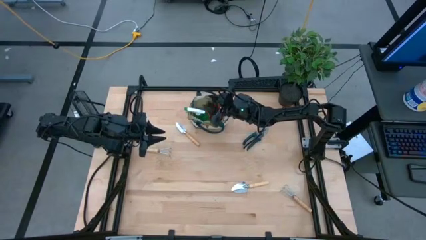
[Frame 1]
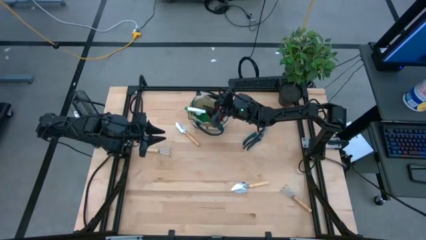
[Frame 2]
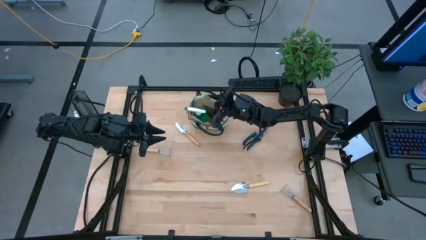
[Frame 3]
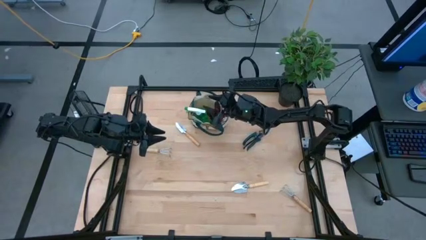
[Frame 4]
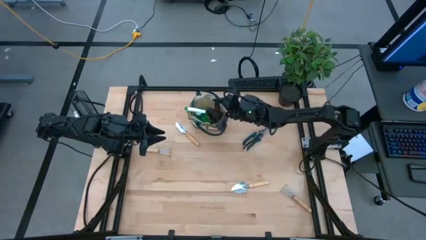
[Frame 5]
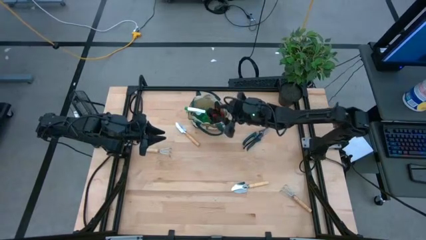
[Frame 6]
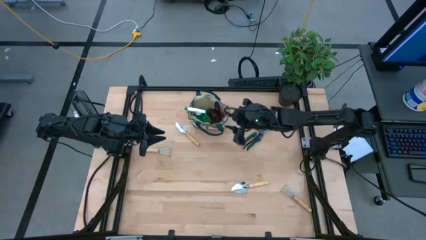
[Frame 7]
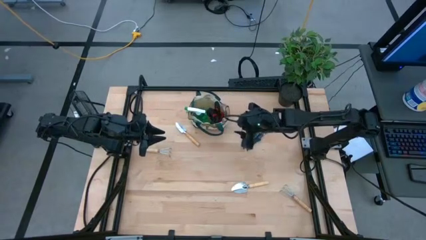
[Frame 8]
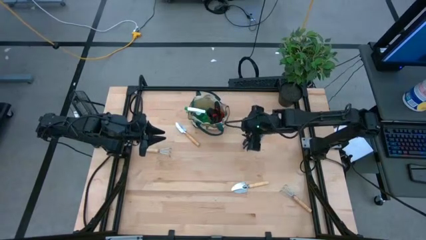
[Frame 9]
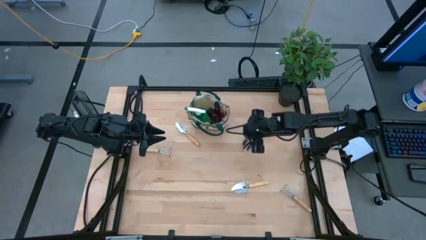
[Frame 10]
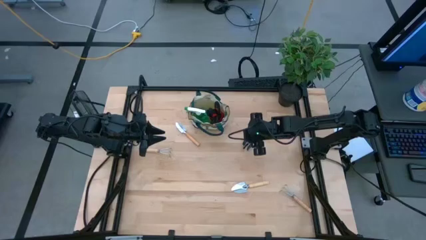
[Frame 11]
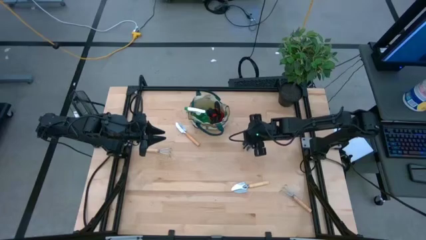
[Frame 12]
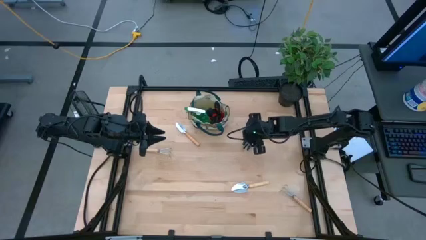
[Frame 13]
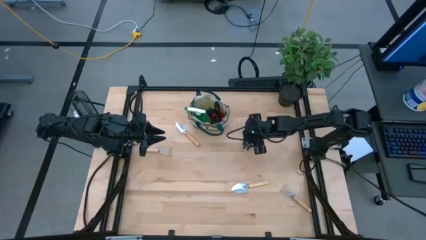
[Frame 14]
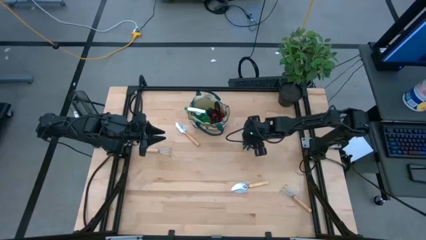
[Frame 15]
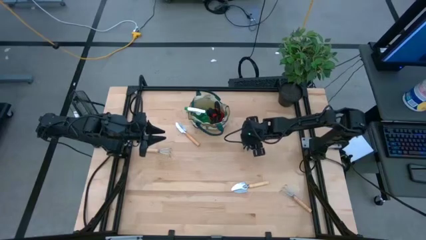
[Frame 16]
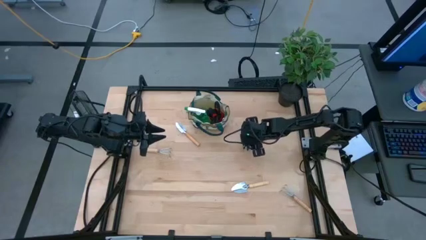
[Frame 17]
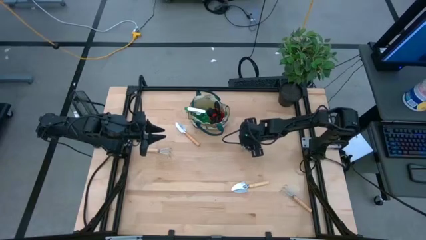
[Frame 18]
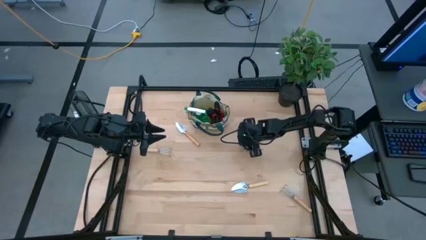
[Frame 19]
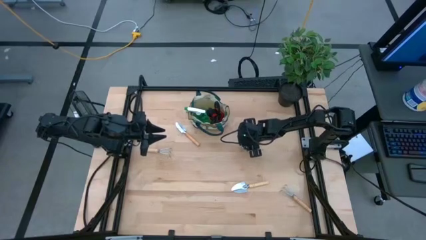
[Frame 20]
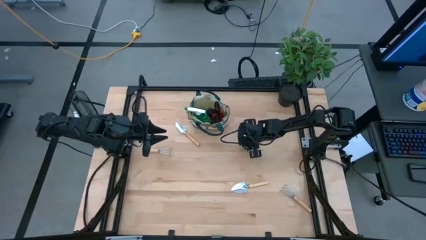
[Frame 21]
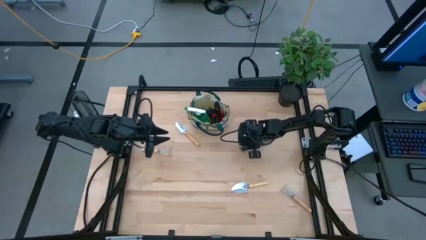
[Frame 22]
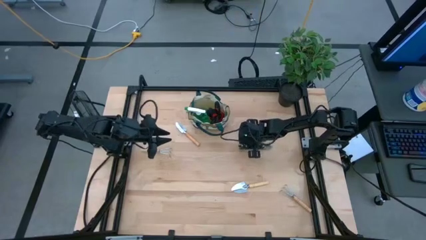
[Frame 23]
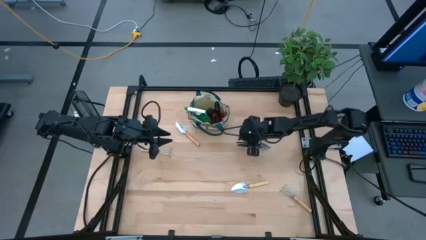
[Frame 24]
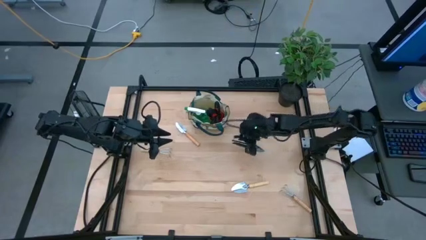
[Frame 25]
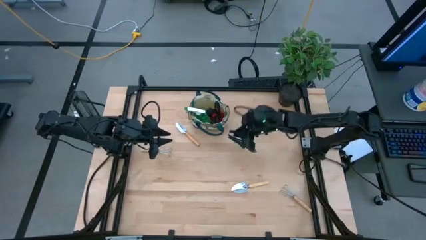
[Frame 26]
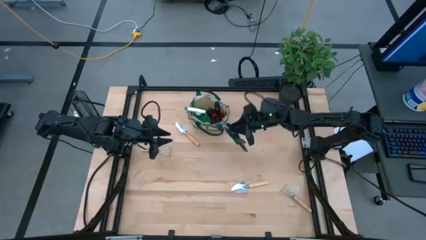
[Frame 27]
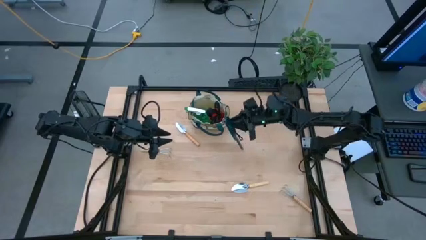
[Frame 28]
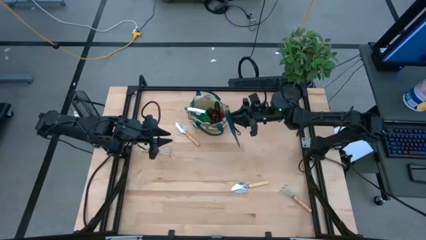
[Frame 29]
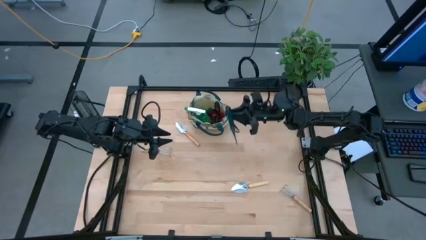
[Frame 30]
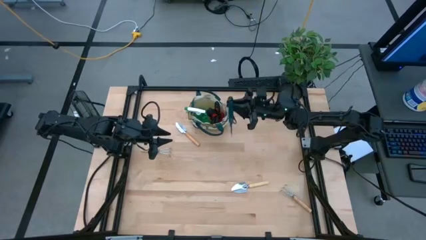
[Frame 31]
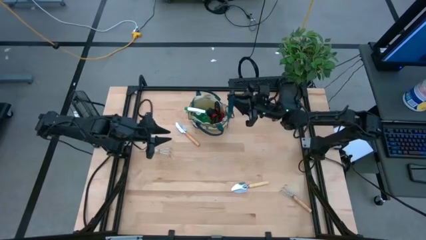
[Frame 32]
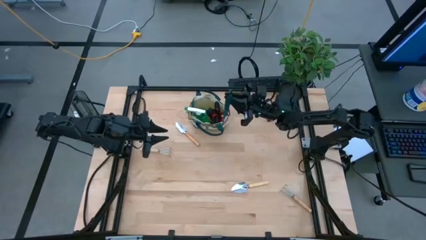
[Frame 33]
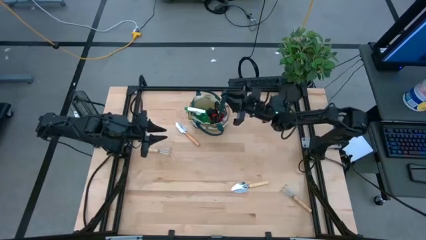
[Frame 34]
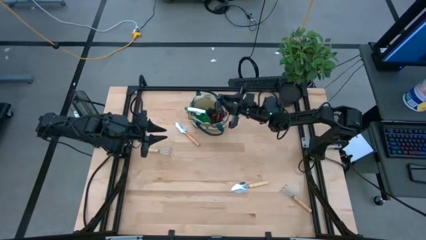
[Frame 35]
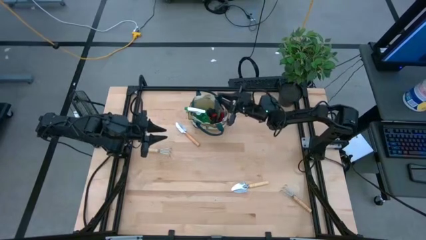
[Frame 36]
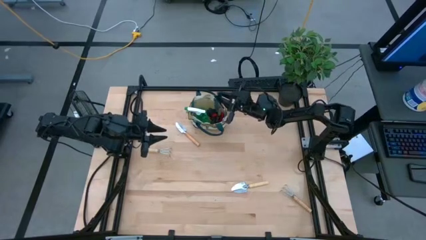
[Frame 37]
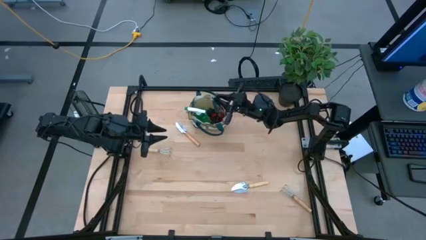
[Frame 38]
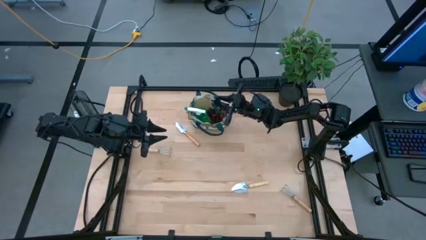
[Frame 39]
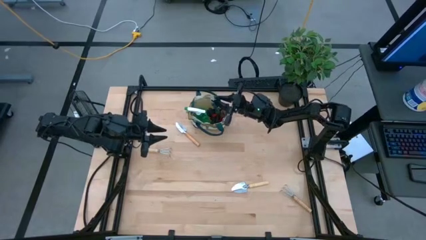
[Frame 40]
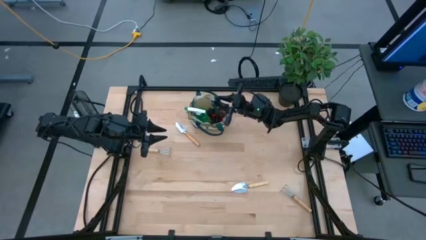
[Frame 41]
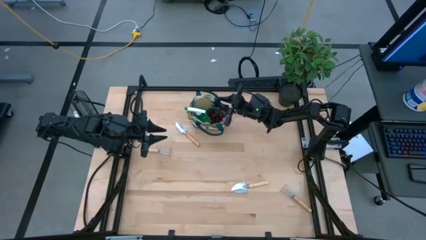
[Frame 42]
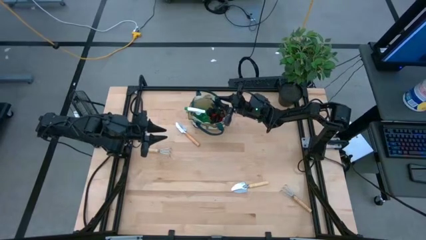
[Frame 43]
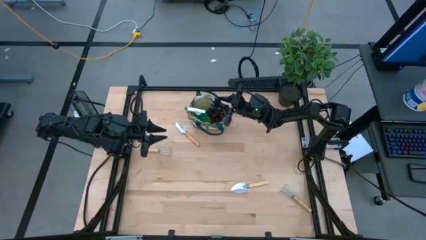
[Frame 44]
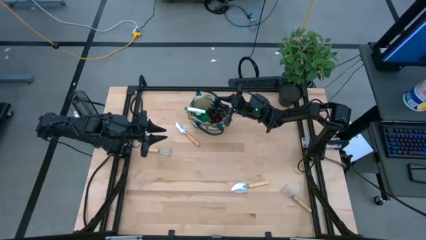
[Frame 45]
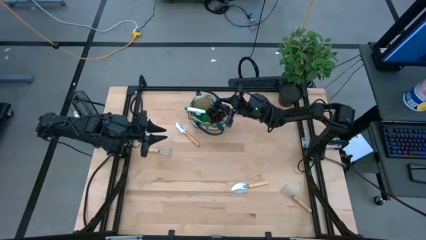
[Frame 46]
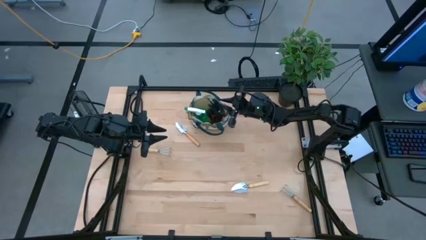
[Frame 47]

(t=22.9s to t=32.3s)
Task: Pick & Place Garden tools in Gardening bag
Put the green shear scissors into the gardening bag

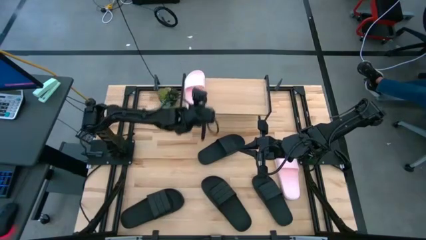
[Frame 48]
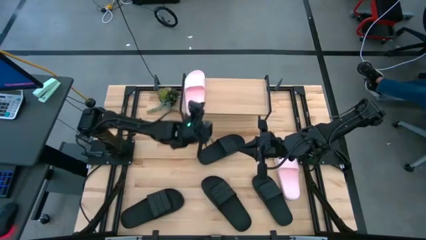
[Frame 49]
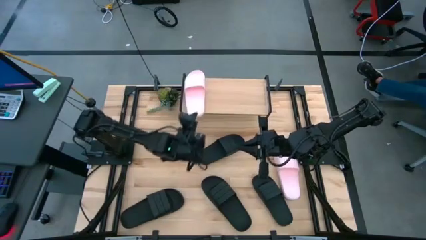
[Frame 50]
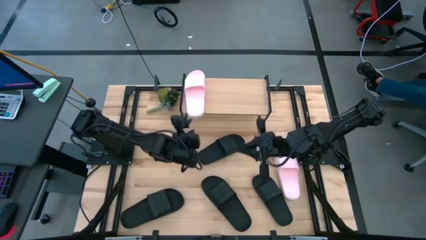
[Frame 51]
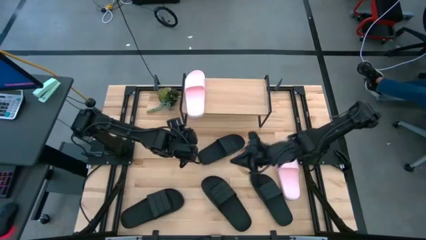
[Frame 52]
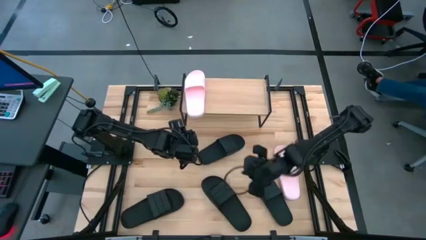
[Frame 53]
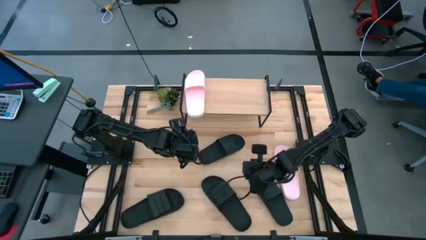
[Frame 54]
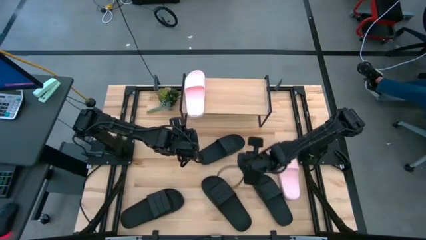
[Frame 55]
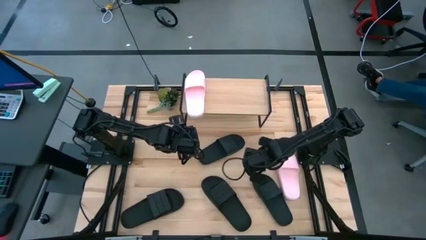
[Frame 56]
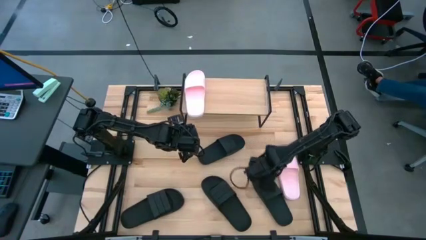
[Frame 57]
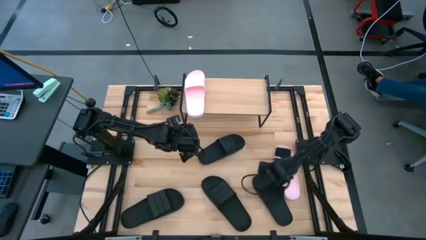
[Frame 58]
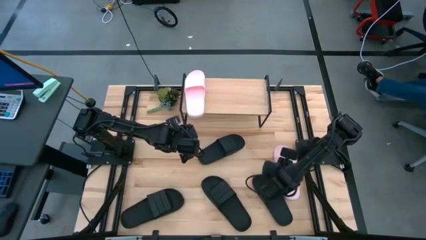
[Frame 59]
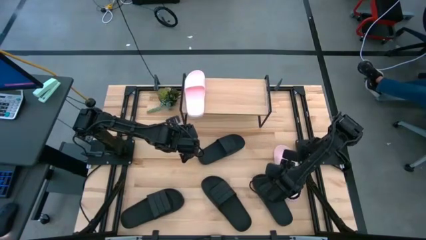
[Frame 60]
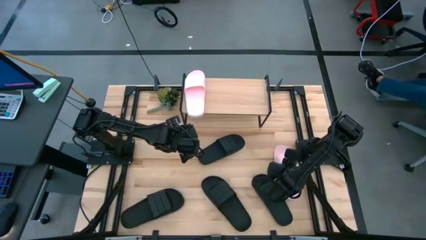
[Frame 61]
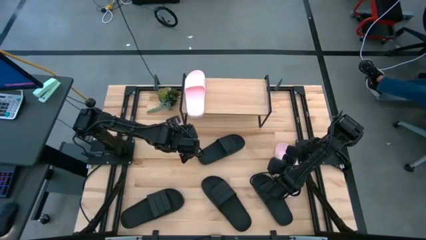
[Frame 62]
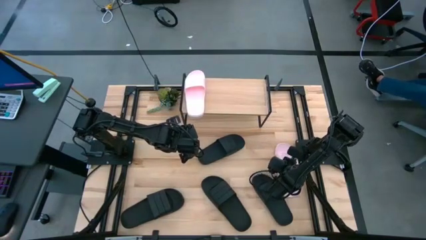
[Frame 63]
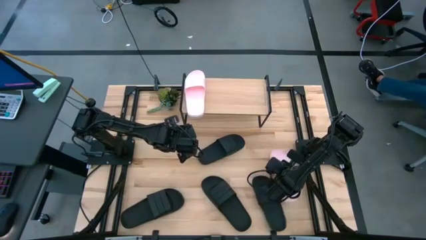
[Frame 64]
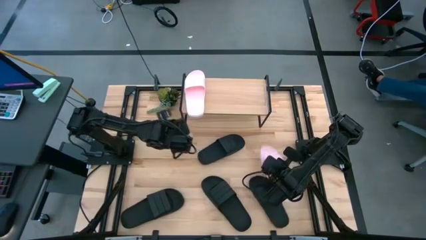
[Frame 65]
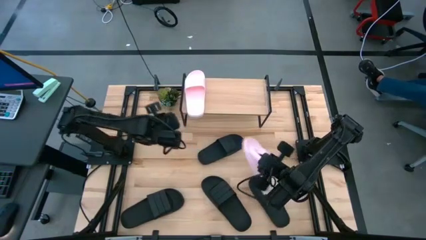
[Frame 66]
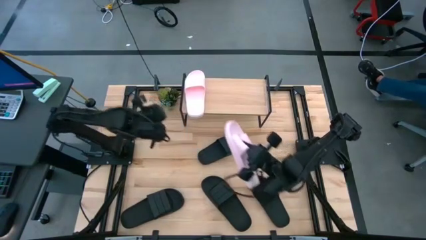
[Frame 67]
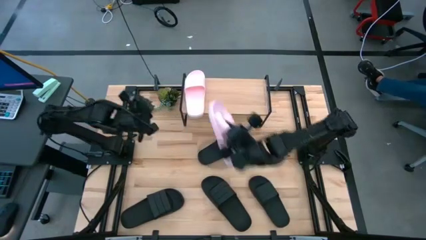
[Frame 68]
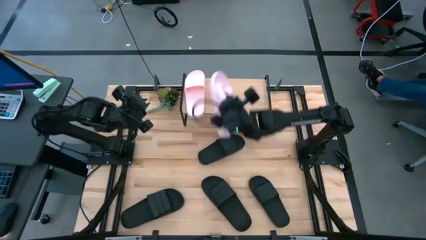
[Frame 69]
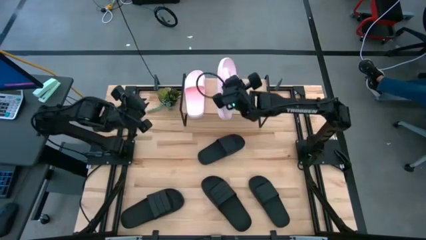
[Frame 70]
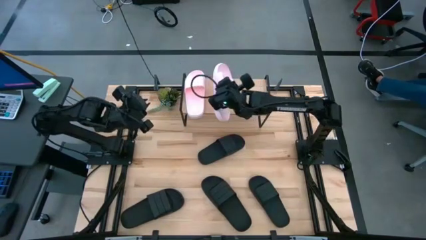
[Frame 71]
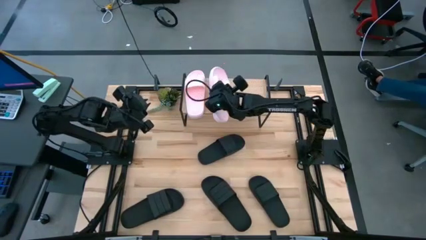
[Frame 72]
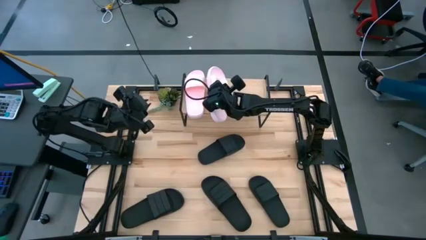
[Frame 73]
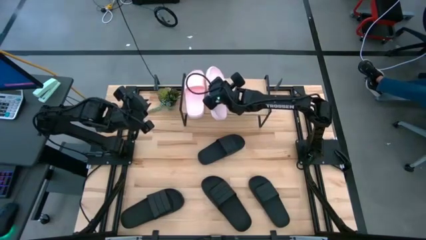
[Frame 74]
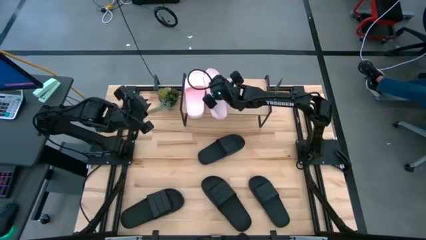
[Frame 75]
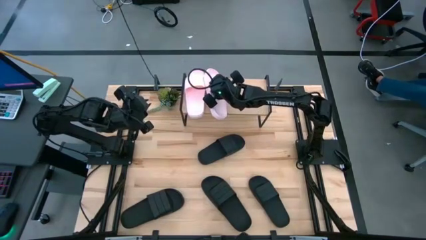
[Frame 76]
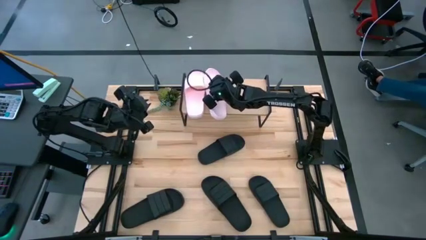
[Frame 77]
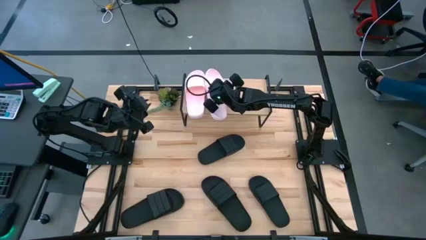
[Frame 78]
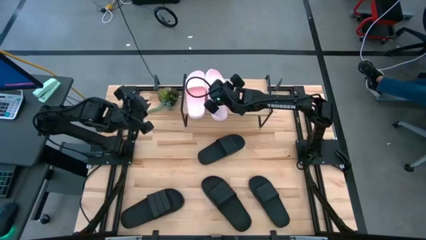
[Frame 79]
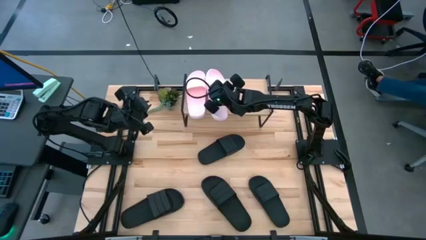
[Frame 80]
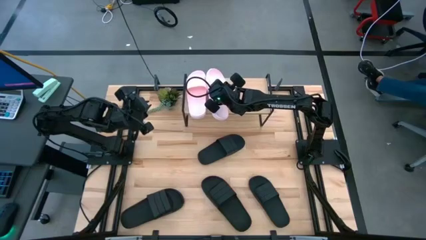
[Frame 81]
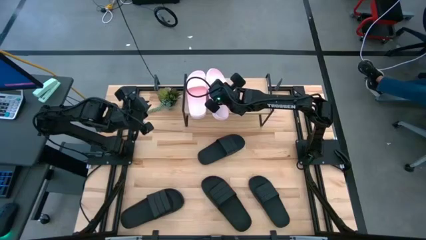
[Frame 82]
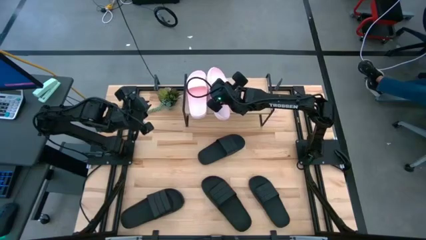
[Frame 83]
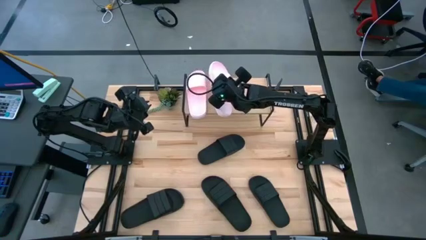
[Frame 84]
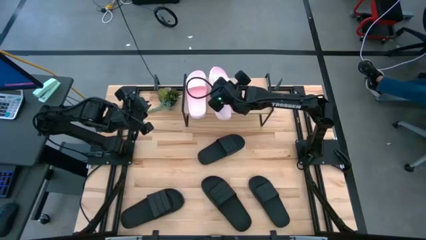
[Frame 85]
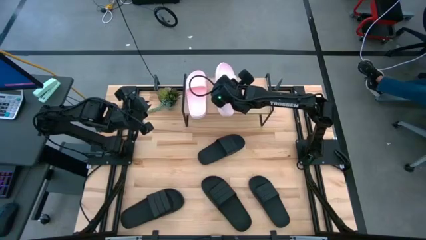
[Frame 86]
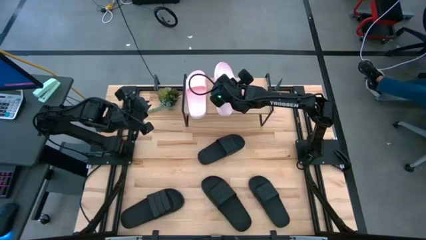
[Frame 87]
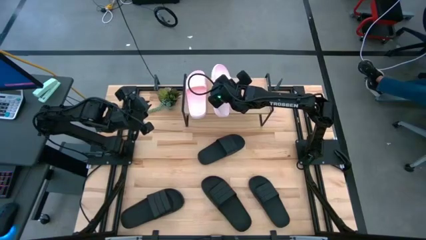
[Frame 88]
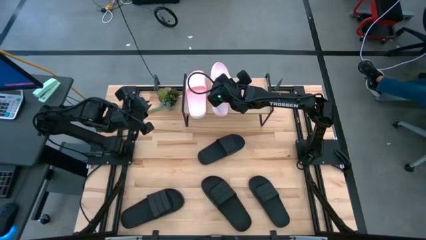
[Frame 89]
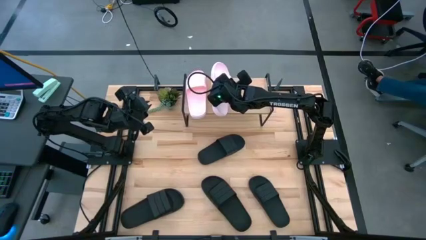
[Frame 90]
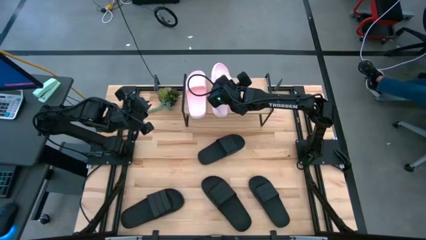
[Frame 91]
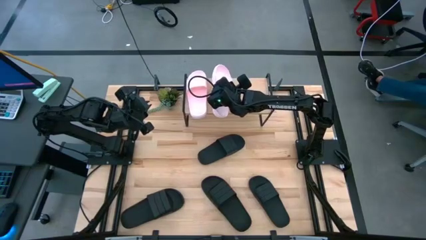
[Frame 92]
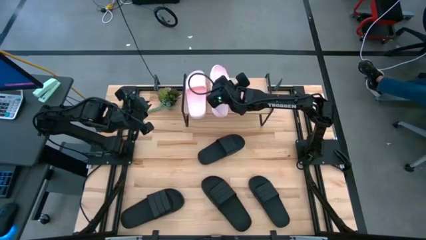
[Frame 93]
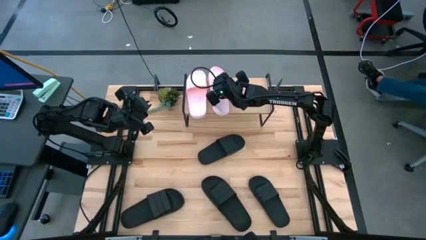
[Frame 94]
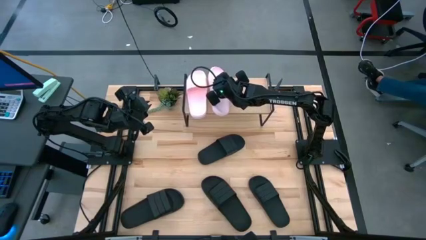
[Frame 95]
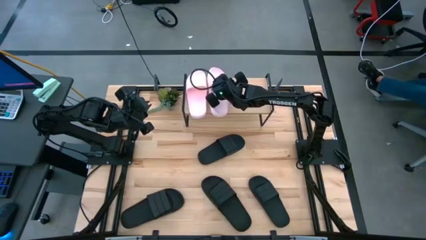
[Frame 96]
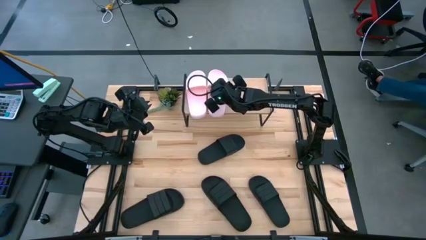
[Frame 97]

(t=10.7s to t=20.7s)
Task: Pick and place slides into the shelf
Put the pink slide on the shelf
